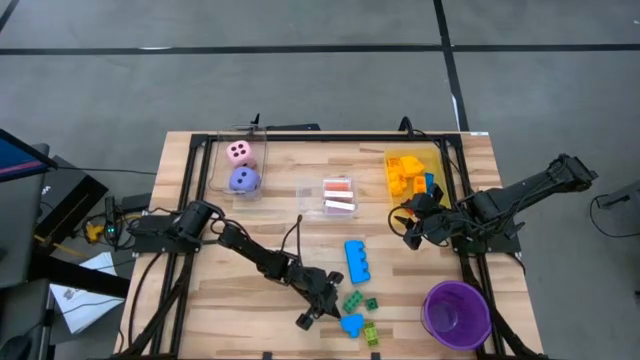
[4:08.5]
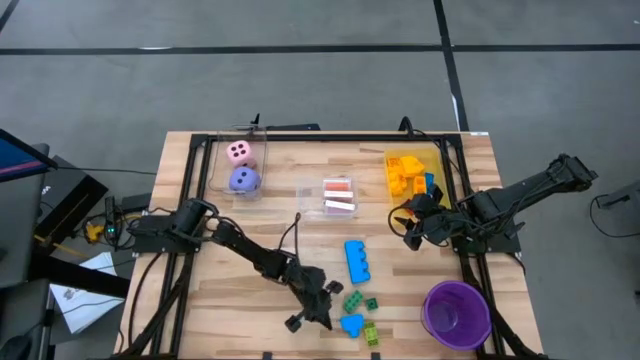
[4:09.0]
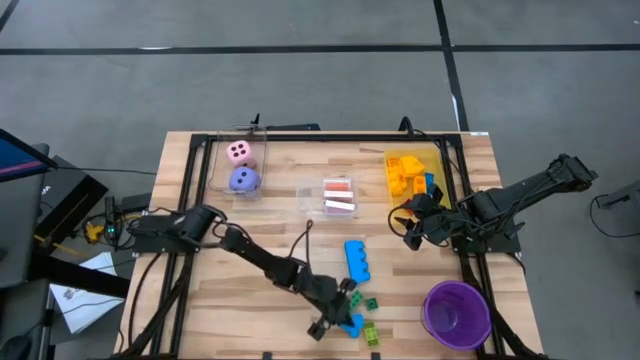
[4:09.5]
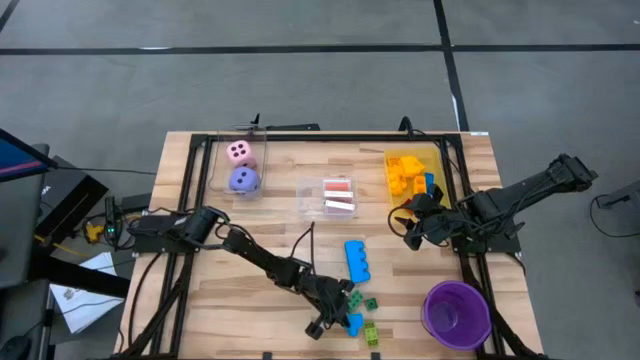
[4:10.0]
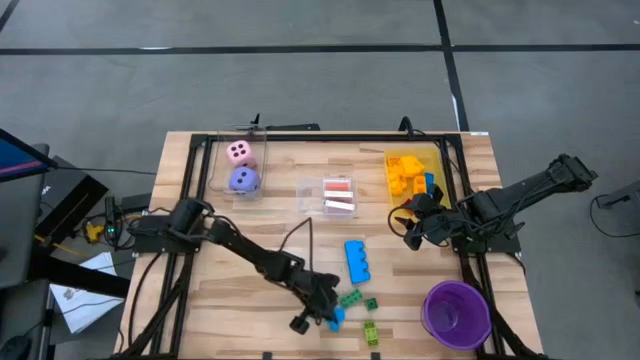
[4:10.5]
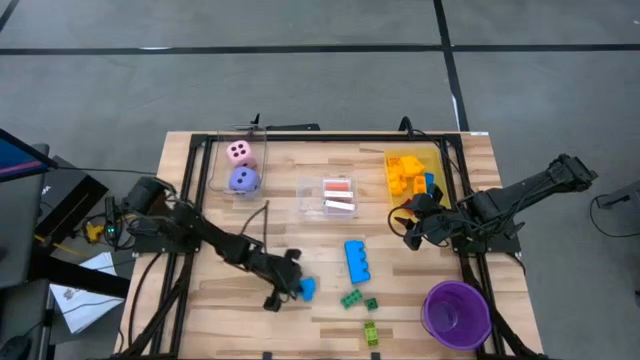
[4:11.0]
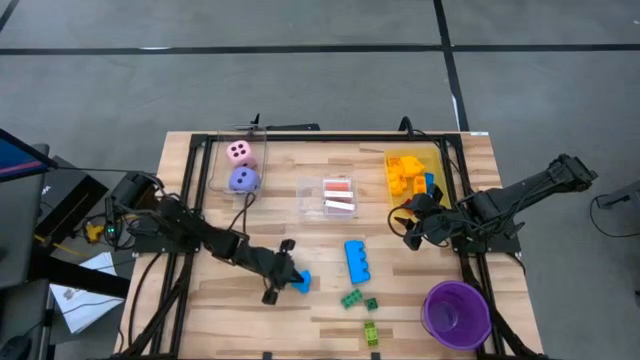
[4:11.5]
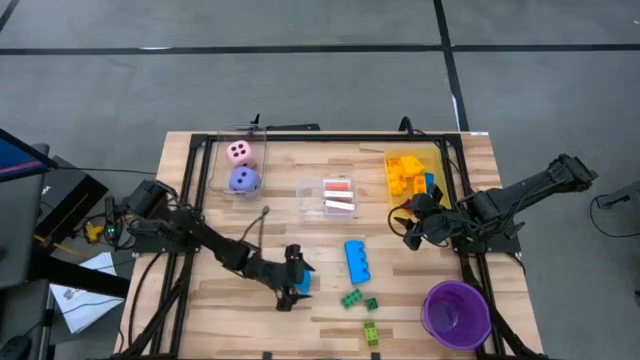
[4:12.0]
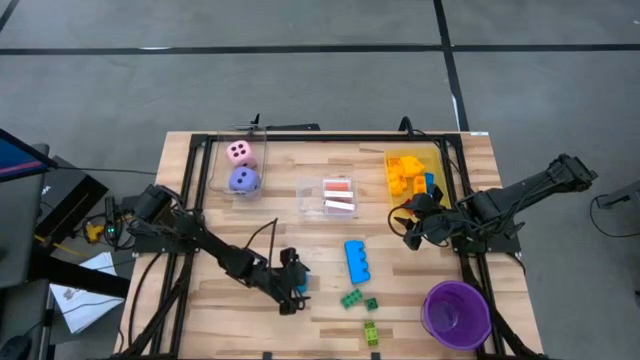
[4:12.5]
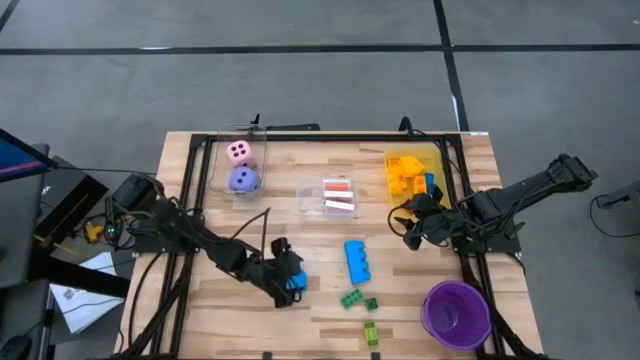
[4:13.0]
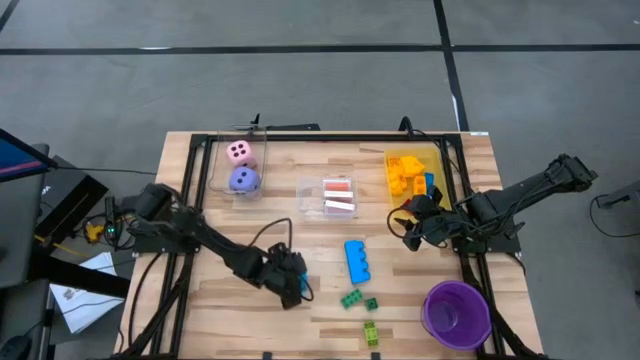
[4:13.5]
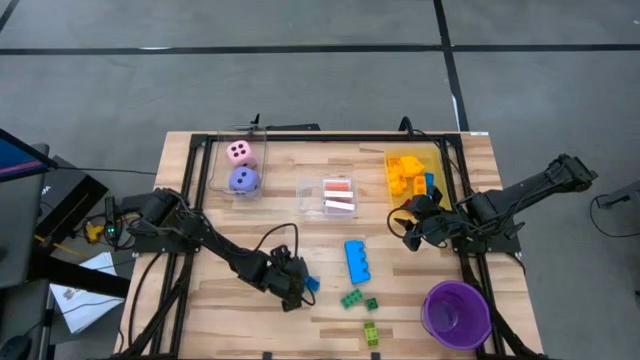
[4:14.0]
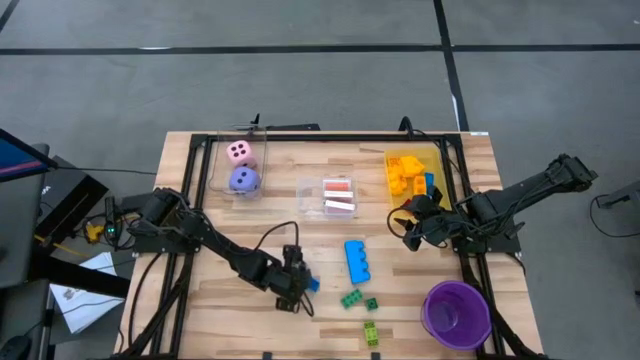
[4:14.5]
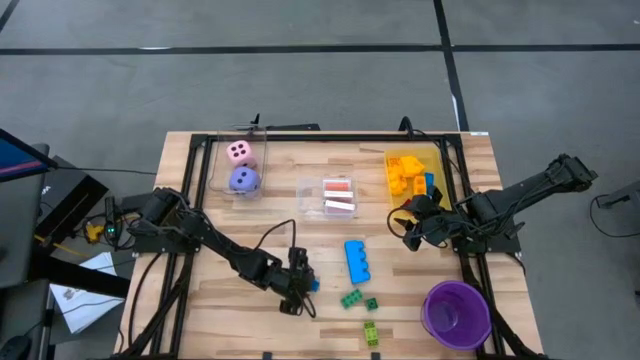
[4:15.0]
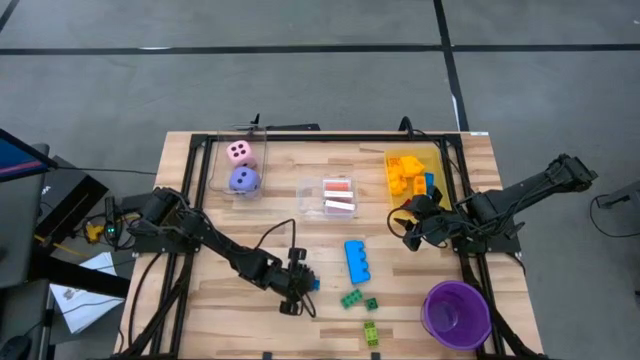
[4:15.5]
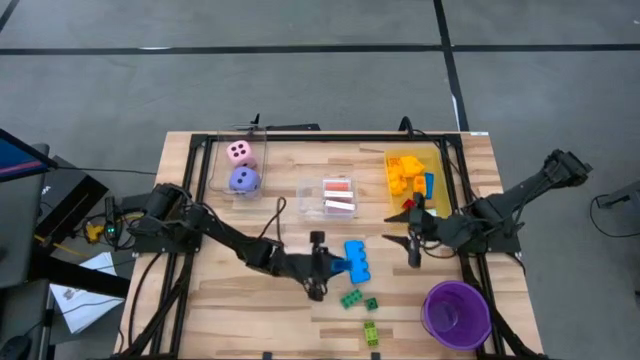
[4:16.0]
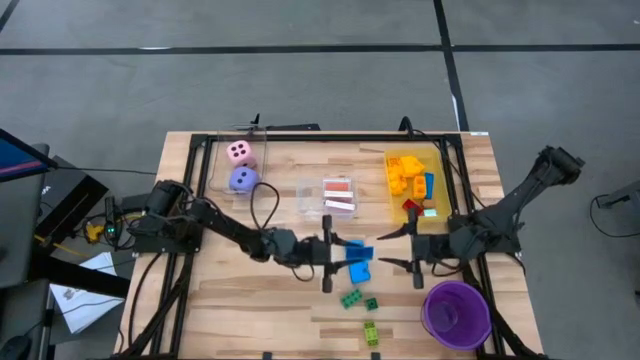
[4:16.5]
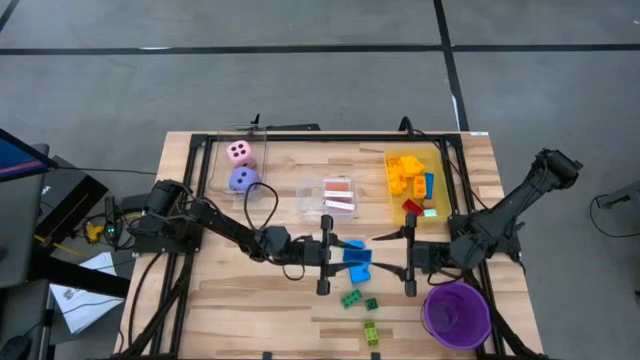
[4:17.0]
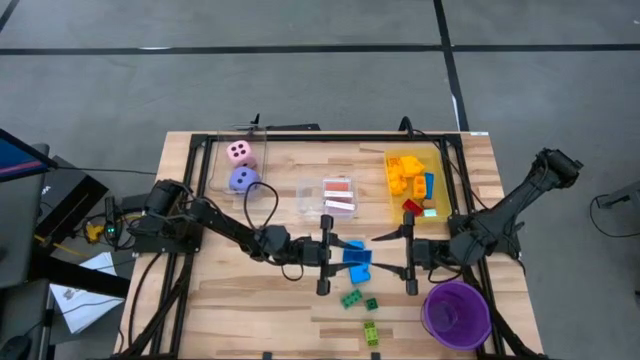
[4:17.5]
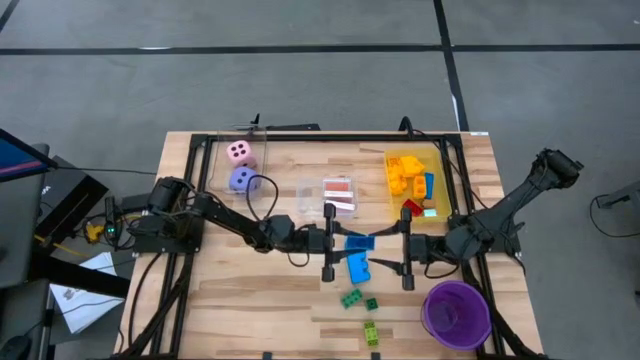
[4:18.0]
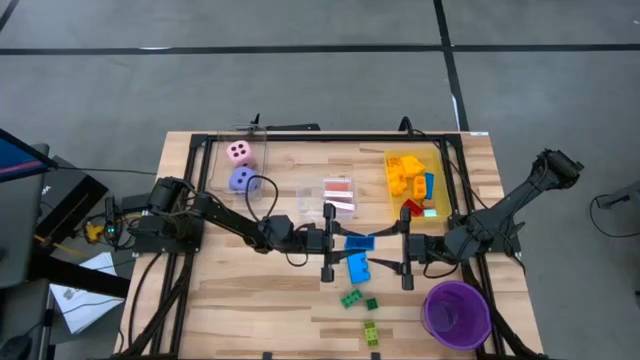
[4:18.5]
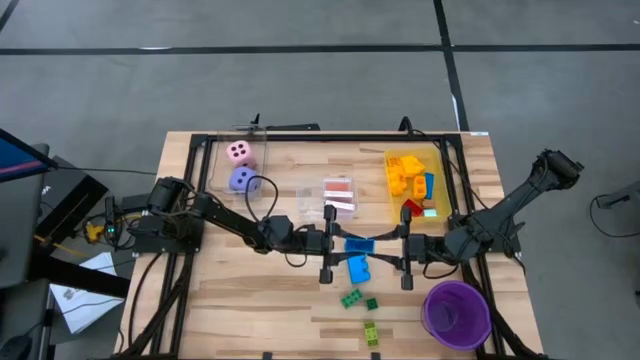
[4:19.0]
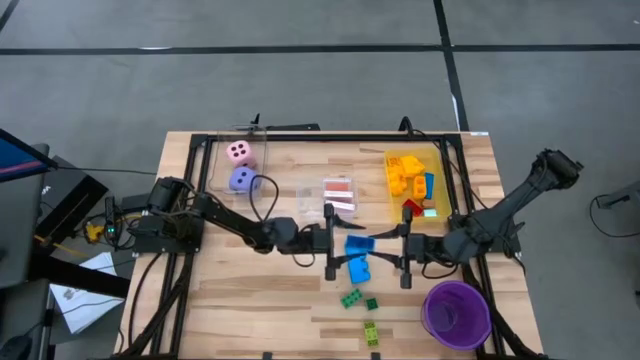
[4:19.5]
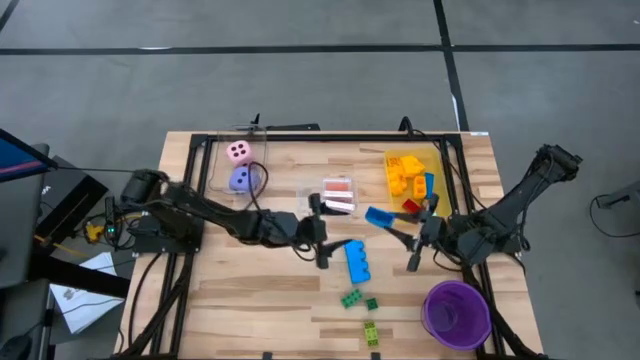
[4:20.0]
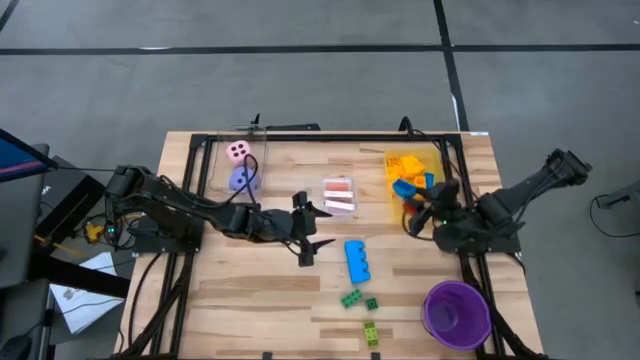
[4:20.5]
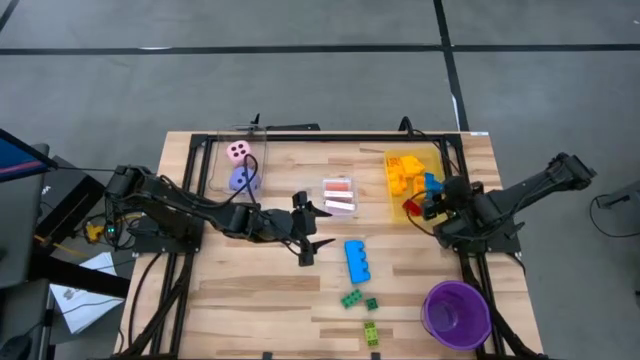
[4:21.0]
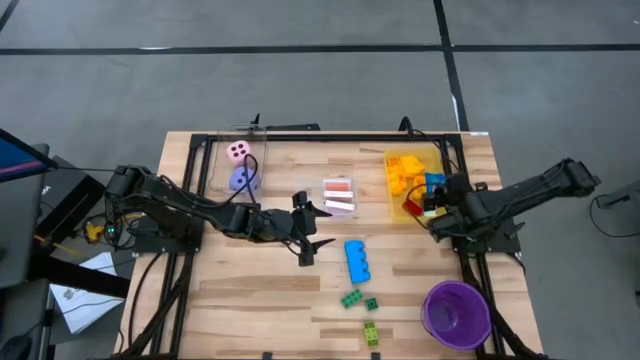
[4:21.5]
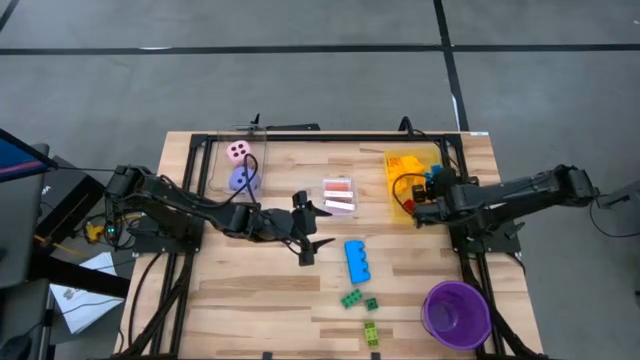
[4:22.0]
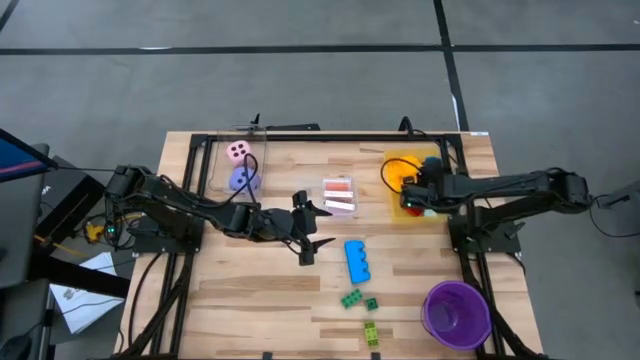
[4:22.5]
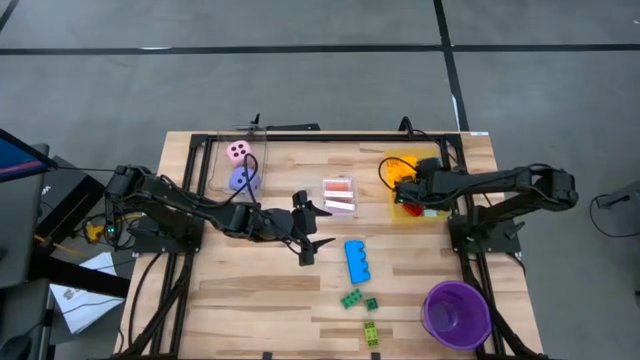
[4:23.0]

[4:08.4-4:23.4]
Task: Pick & Place Toys
Put the blue game piece into the yellow bin

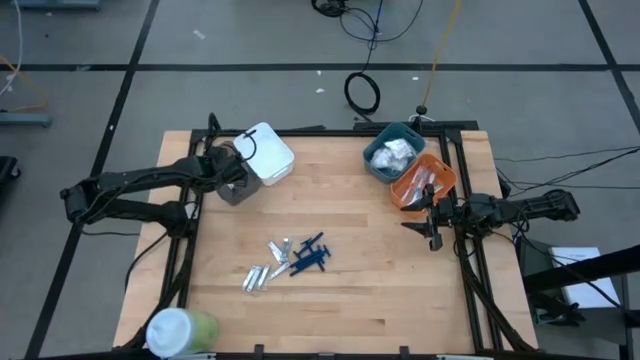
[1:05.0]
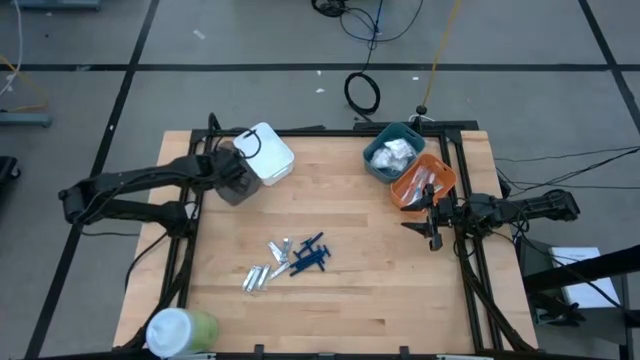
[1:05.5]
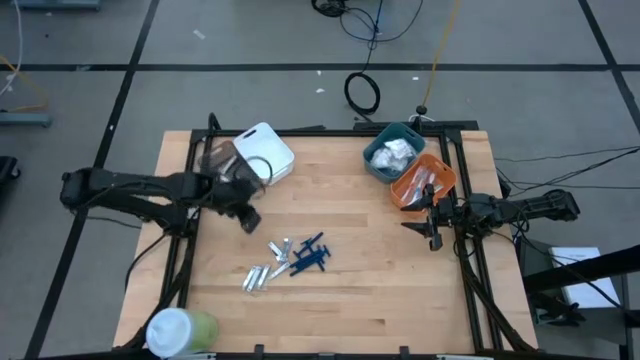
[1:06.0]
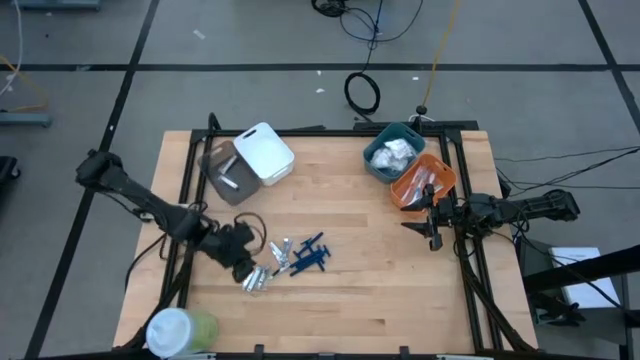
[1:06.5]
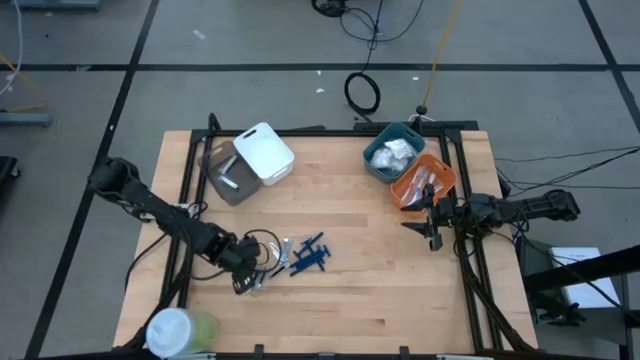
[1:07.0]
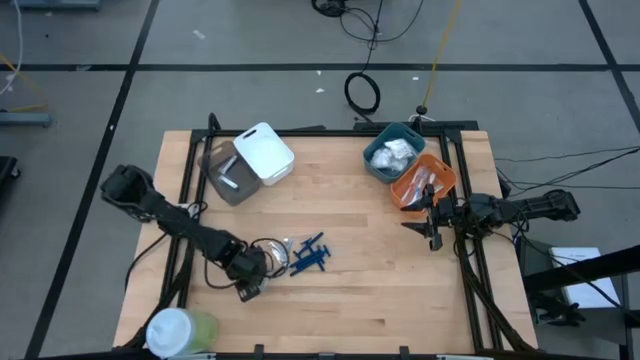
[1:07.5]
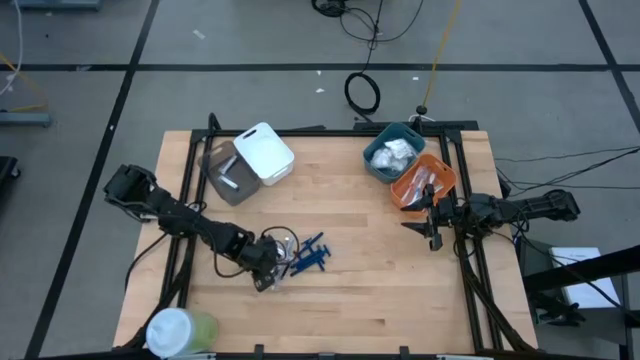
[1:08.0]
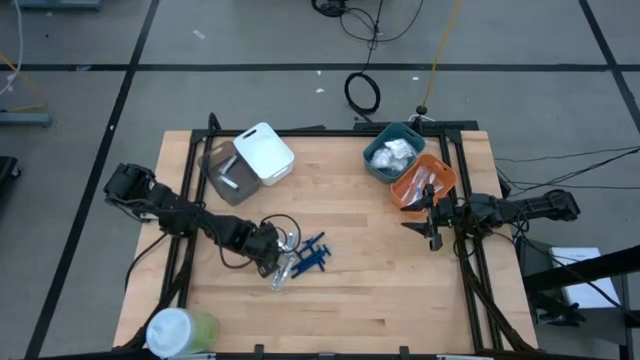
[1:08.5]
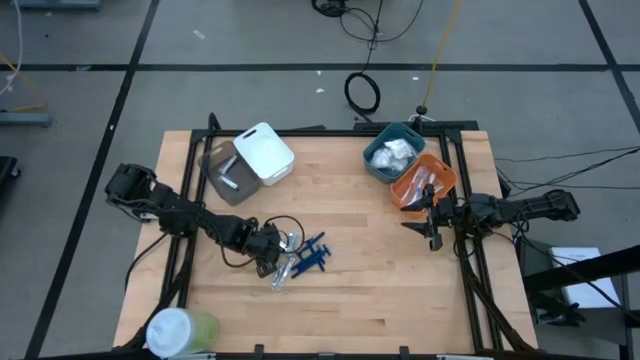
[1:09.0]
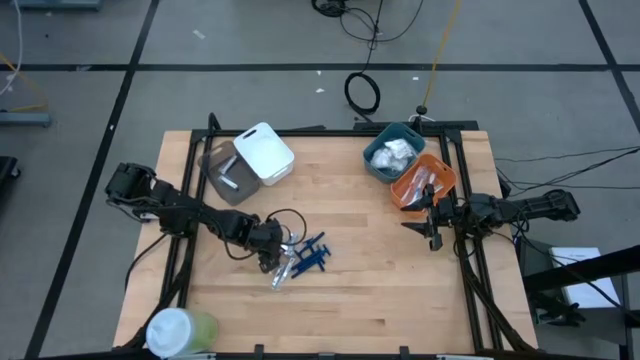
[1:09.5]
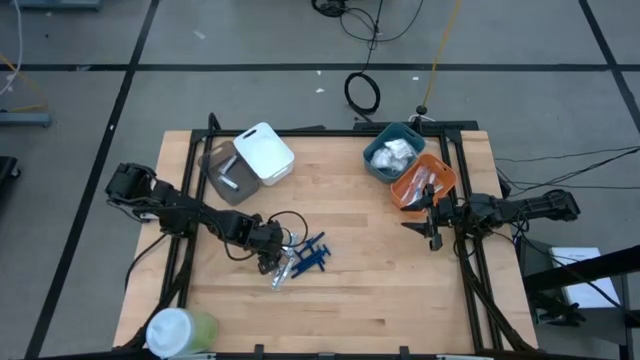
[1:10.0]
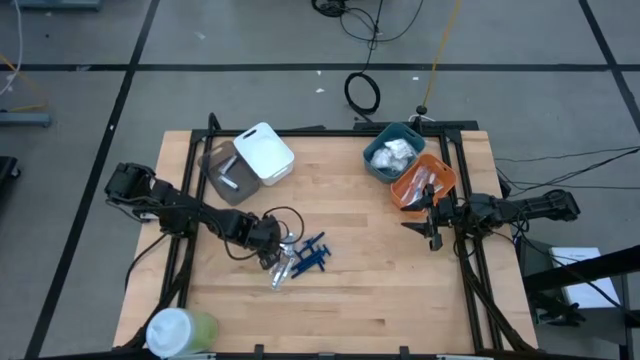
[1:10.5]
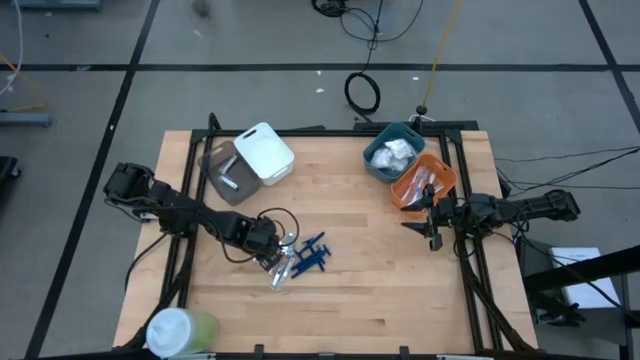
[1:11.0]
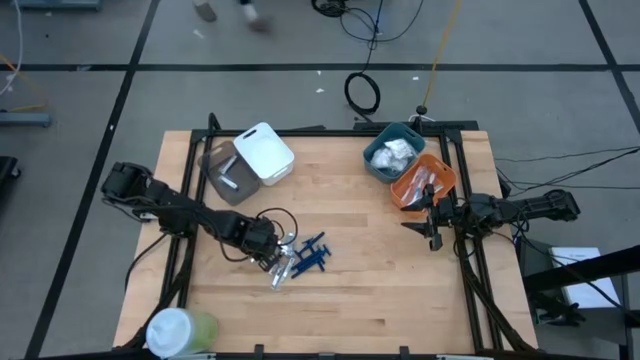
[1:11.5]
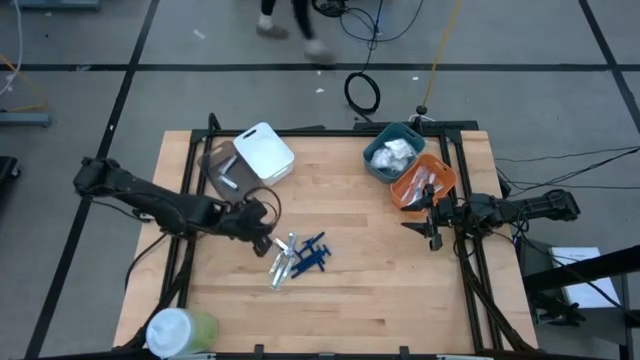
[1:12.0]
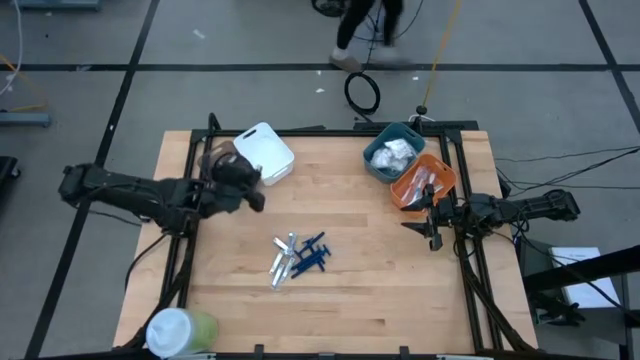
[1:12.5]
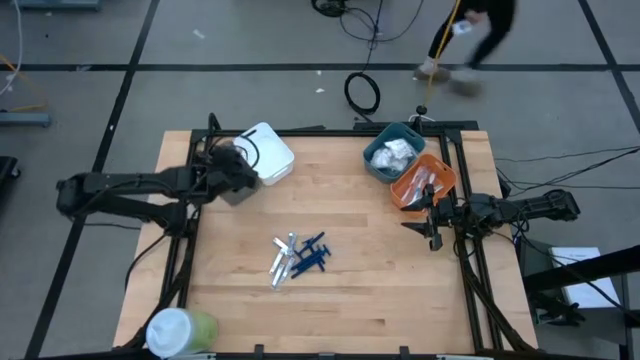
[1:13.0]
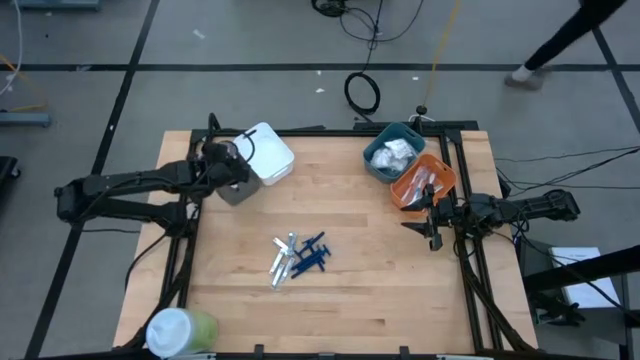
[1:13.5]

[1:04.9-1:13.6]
Task: Pick & Place Travel size toiletries
Put the silver nail cutter into the black bin
